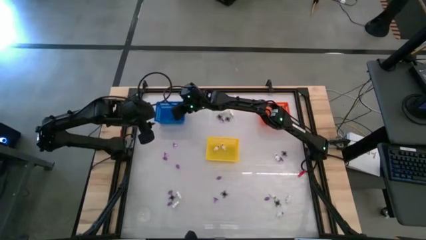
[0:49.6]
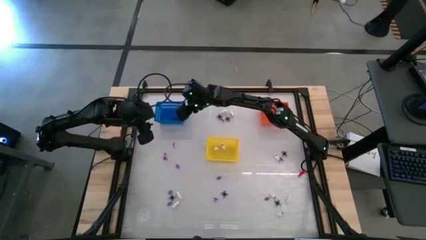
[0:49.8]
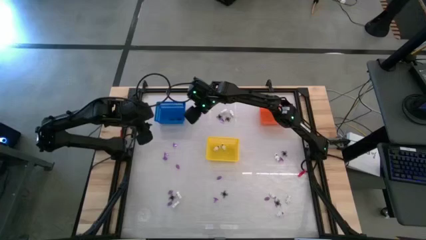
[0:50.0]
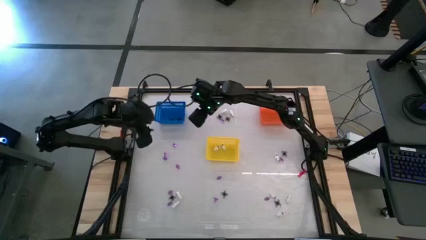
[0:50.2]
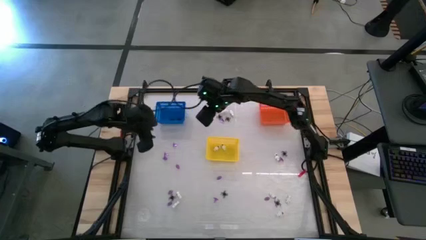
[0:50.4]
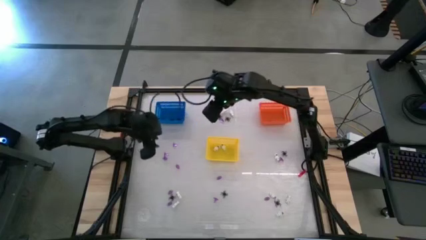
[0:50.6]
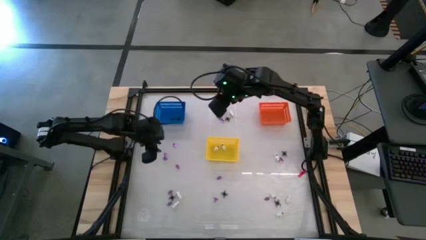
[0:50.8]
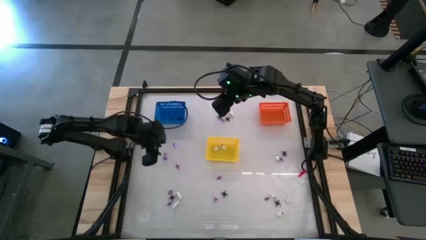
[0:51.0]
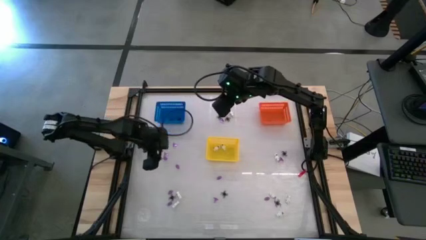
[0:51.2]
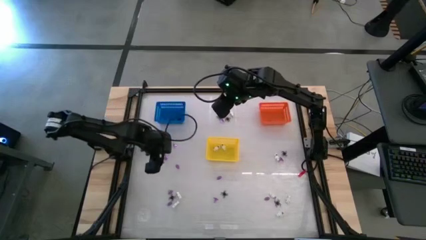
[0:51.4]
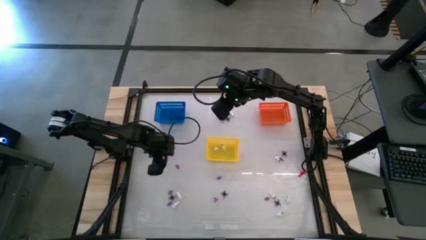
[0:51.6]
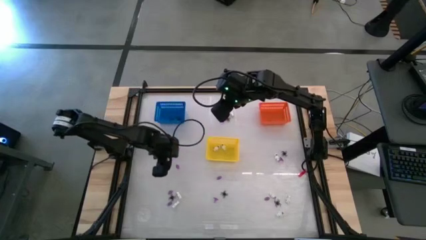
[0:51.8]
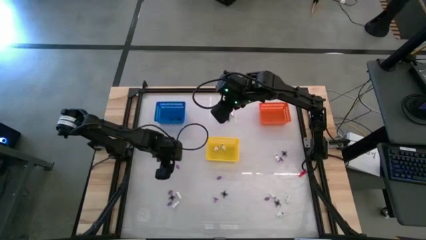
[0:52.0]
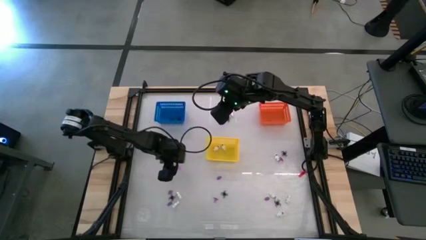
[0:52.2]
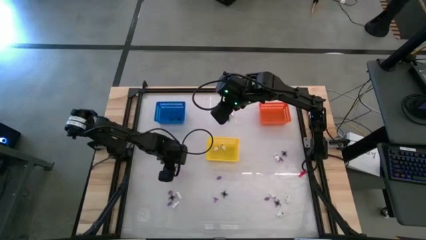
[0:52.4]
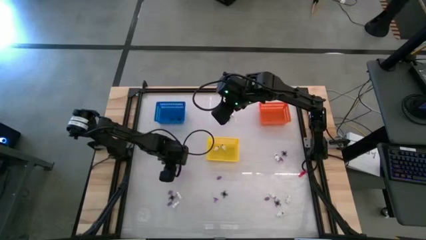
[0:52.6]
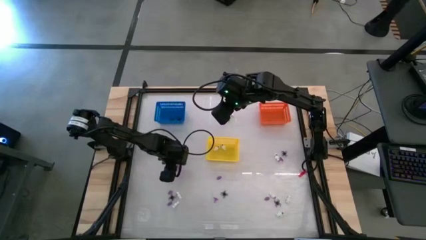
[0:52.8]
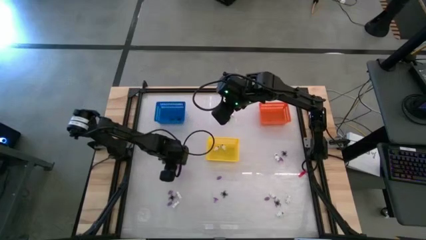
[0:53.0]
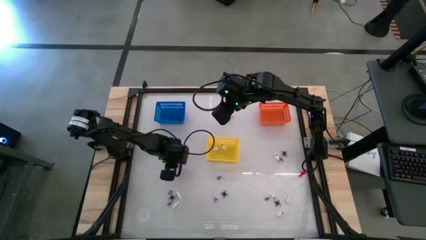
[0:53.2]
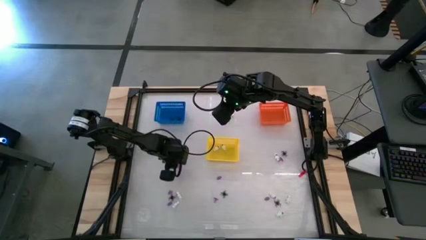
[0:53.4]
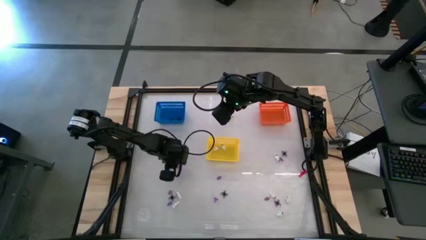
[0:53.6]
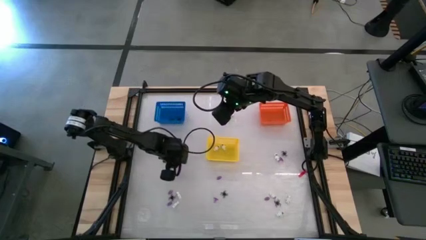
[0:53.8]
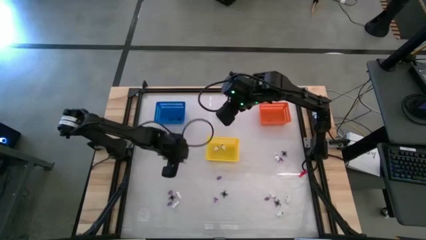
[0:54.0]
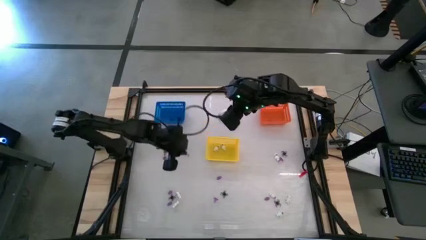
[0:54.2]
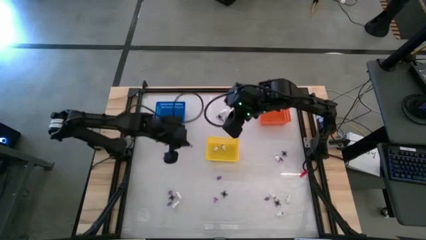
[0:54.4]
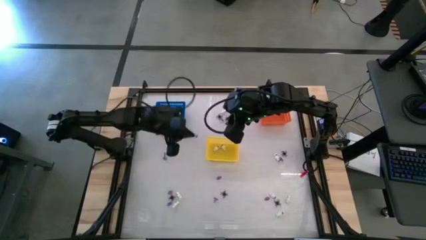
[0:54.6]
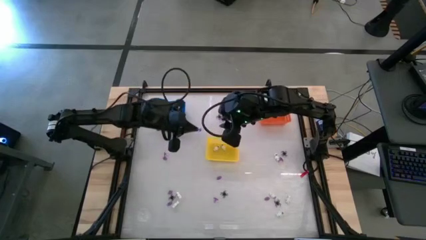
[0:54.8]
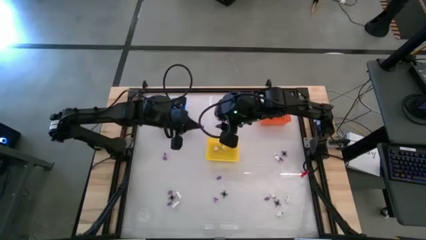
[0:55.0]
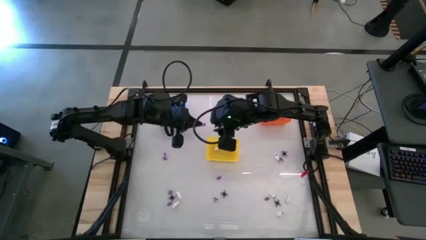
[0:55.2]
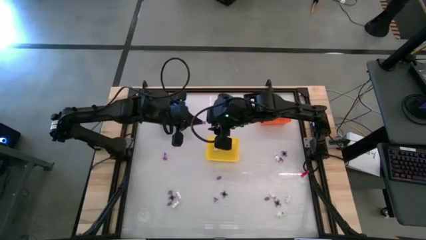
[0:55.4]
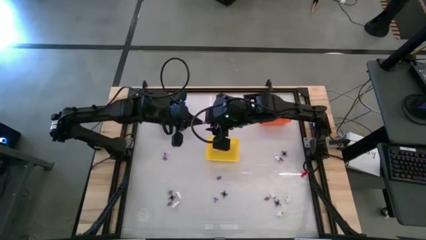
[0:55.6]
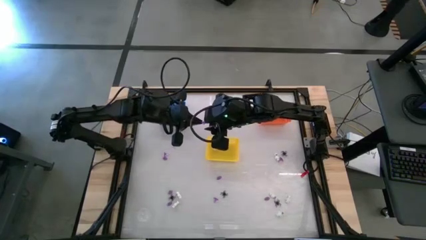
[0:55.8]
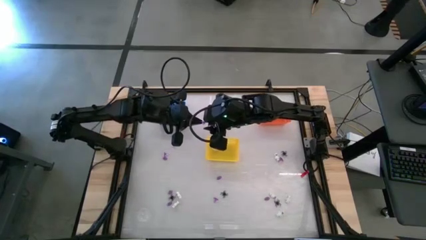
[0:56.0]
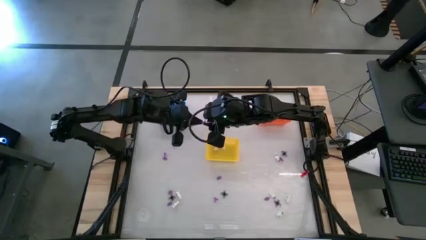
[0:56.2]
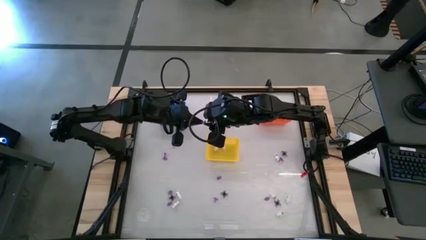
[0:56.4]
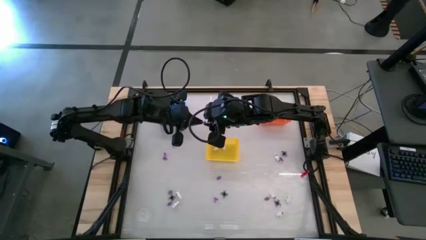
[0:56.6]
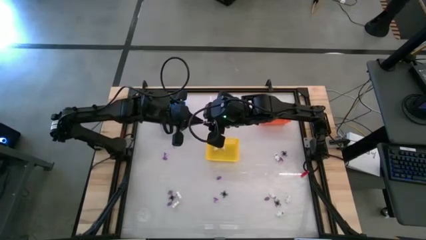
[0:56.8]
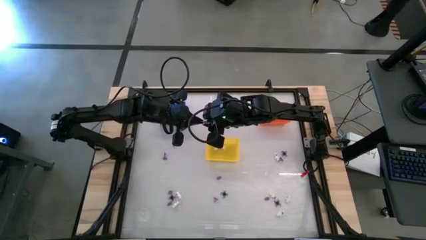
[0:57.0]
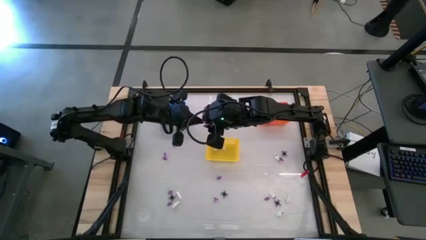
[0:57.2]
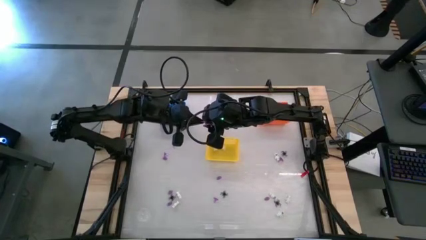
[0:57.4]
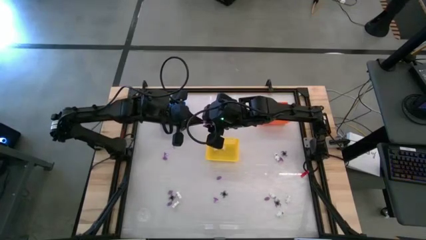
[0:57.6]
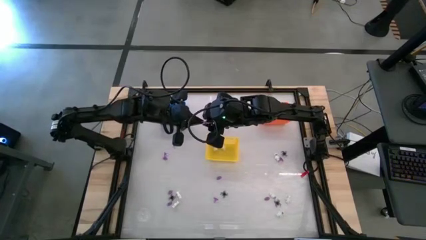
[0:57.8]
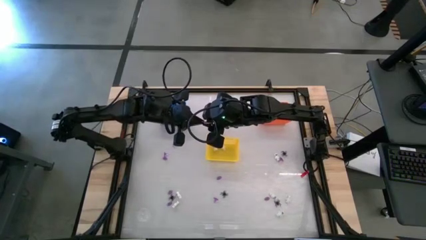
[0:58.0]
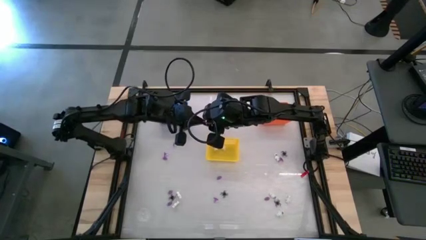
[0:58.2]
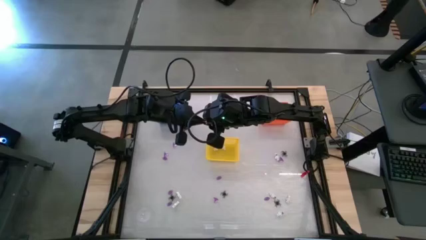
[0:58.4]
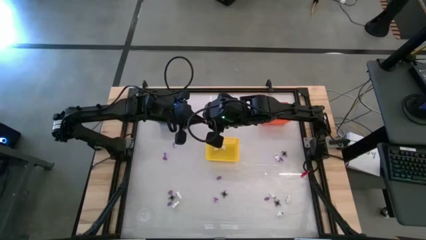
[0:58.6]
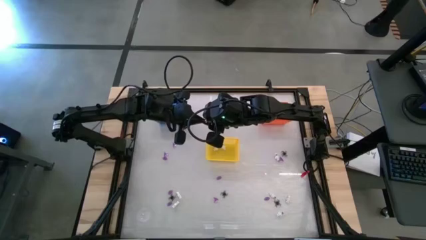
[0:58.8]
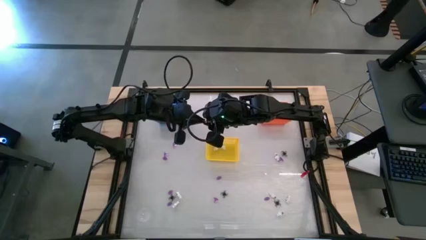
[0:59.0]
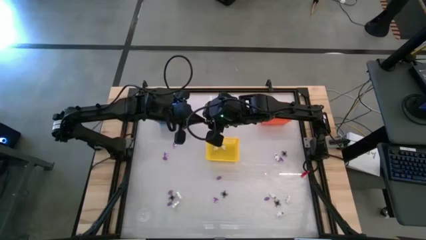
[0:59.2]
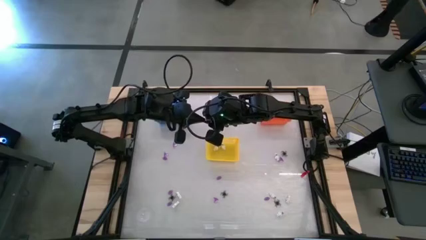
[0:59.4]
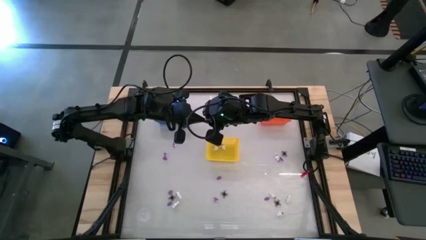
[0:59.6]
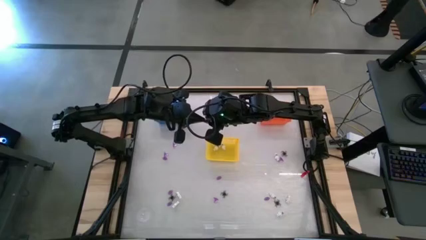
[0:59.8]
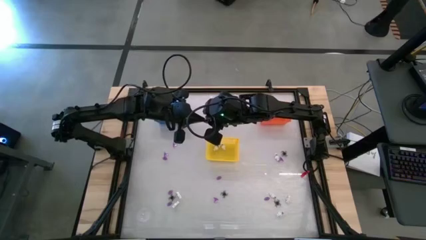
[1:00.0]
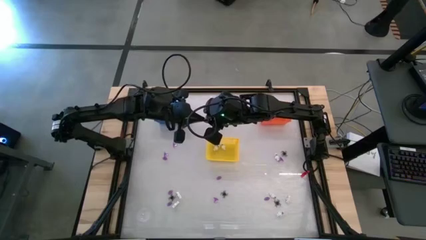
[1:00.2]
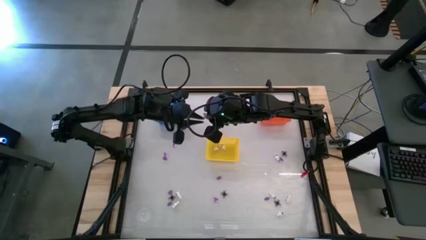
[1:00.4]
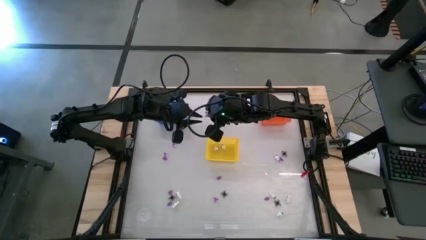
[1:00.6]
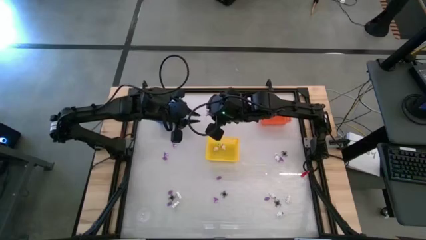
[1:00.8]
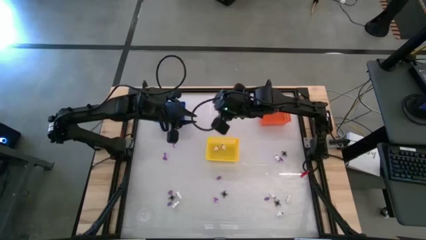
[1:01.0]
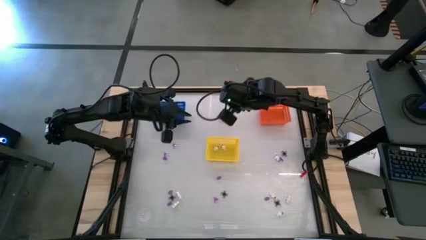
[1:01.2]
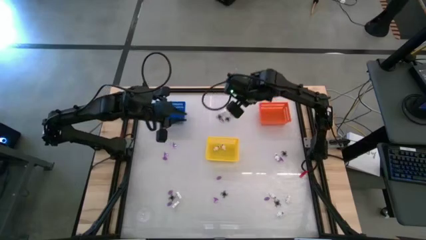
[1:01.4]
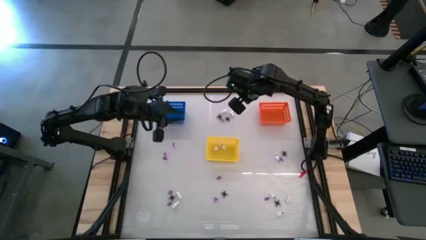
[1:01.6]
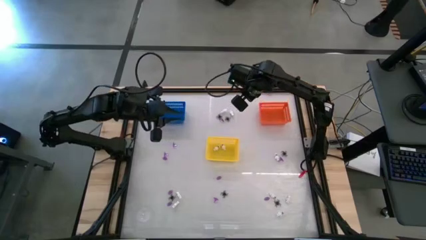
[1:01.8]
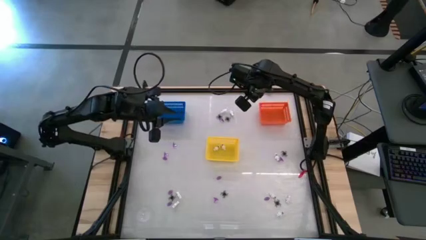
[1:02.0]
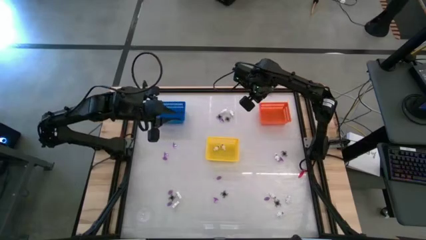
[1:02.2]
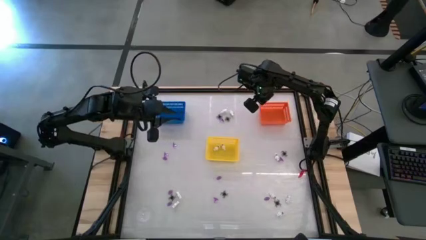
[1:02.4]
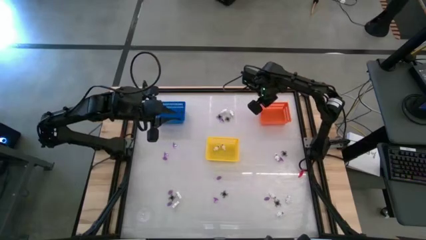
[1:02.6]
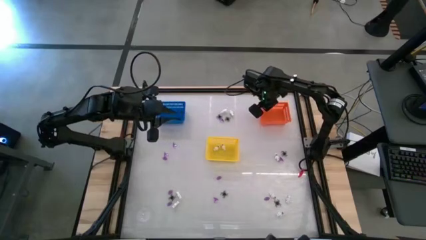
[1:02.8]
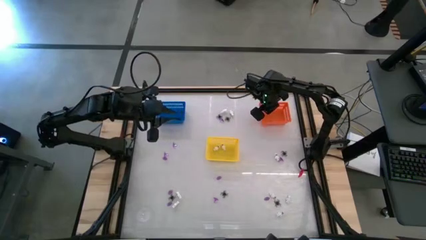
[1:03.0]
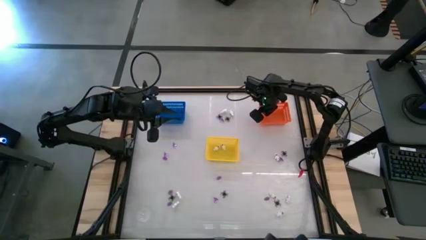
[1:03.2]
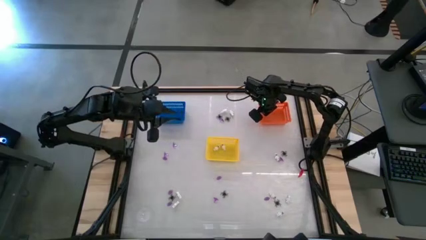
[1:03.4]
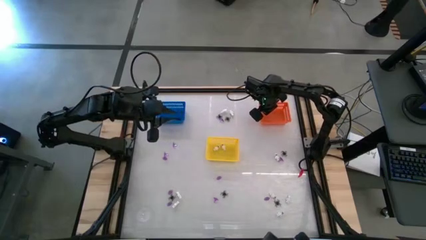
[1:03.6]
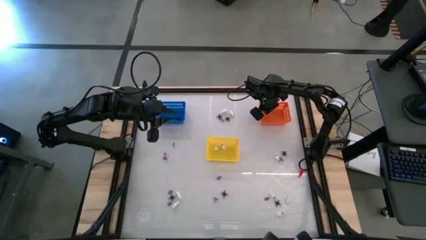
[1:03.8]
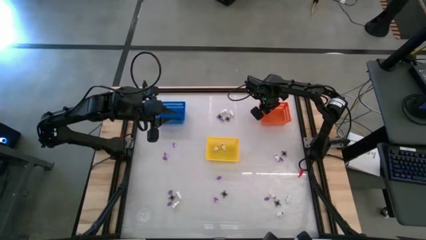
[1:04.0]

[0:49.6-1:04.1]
Task: Sort Halloween decoration
Put the purple witch hat toy into the orange bin
